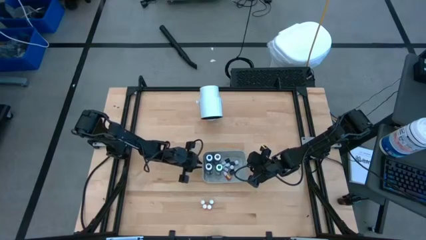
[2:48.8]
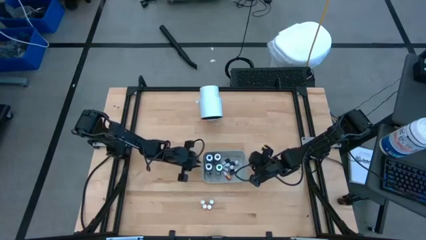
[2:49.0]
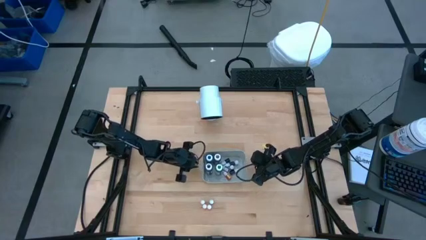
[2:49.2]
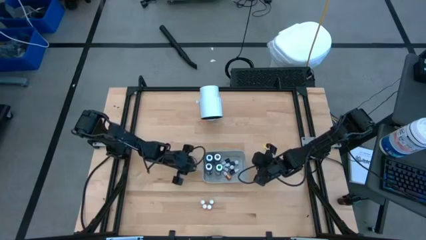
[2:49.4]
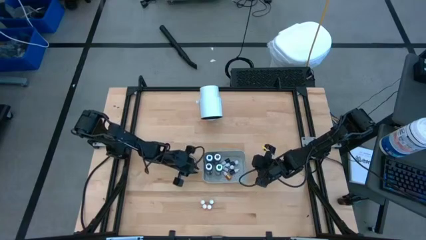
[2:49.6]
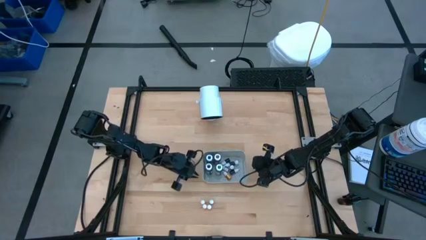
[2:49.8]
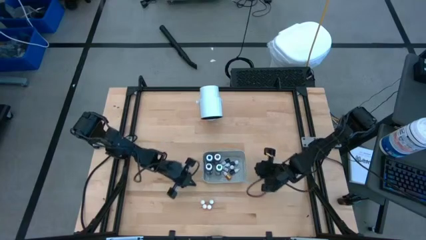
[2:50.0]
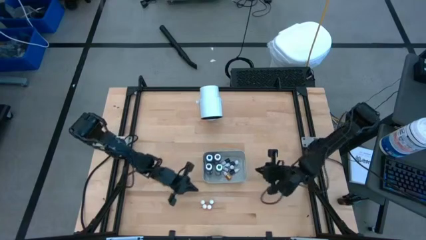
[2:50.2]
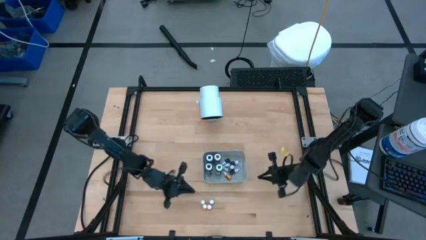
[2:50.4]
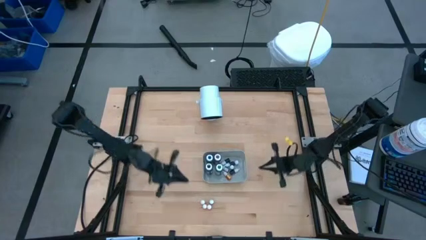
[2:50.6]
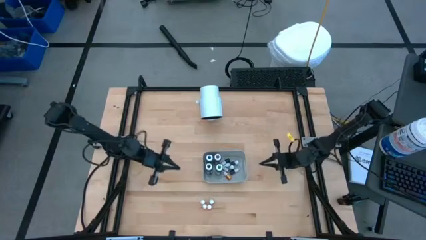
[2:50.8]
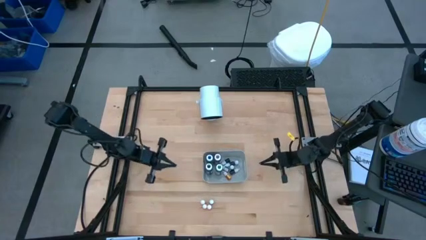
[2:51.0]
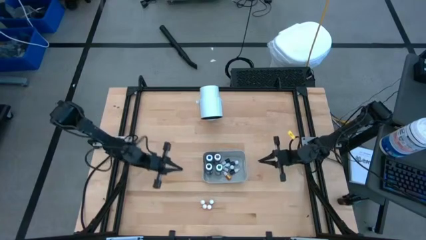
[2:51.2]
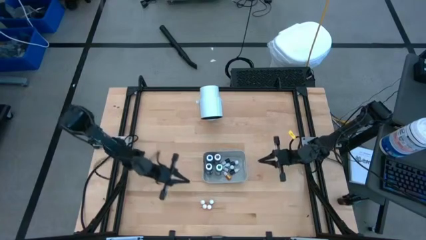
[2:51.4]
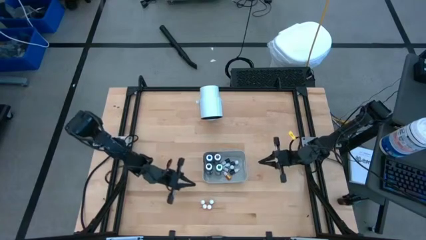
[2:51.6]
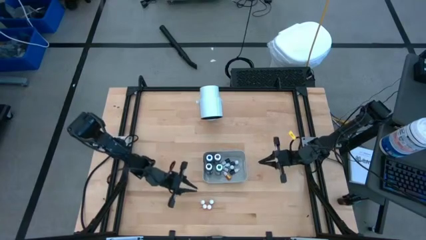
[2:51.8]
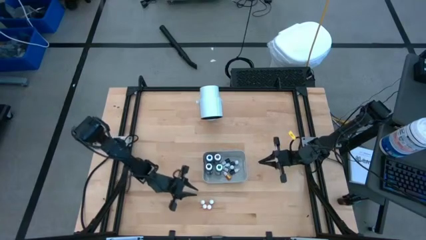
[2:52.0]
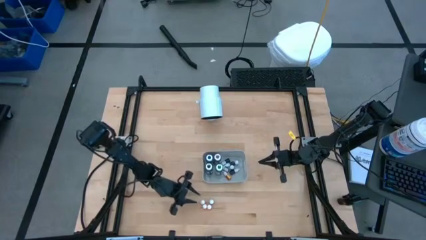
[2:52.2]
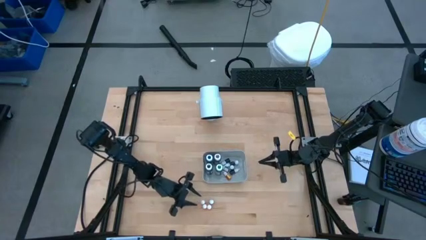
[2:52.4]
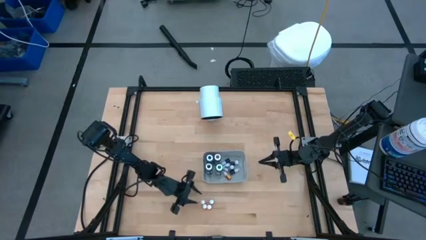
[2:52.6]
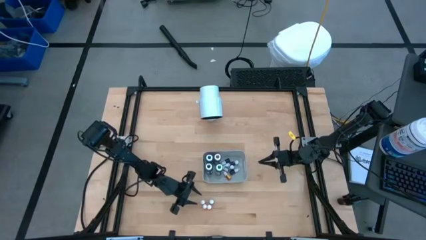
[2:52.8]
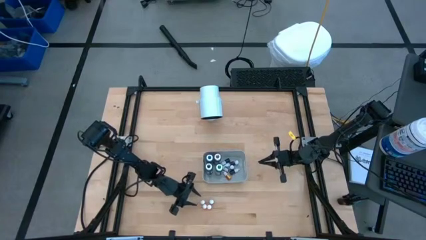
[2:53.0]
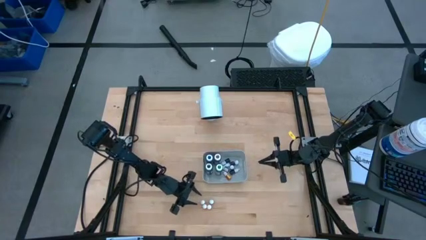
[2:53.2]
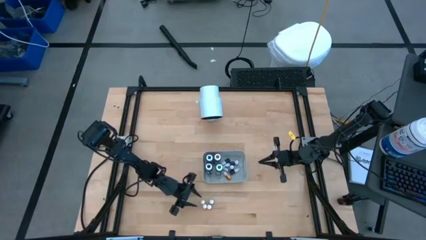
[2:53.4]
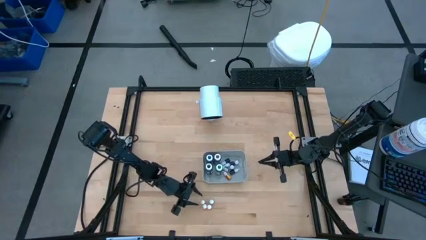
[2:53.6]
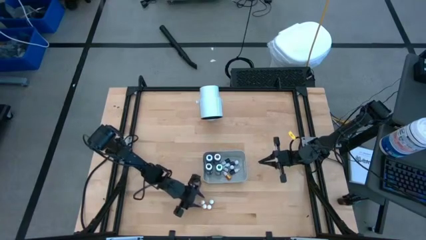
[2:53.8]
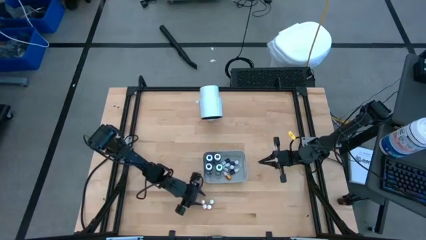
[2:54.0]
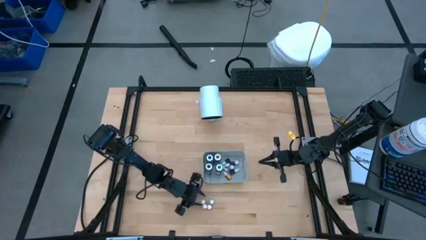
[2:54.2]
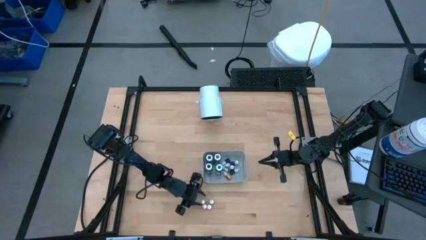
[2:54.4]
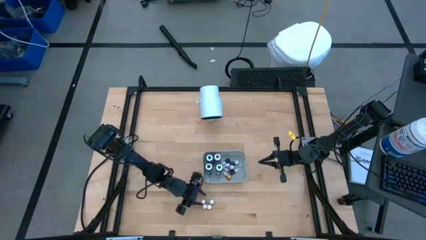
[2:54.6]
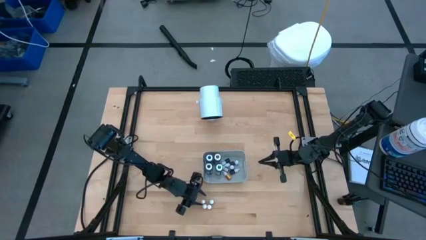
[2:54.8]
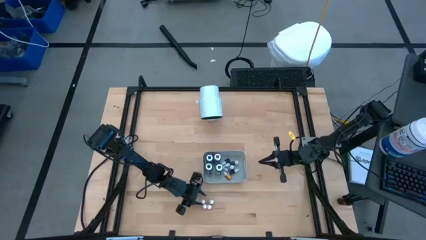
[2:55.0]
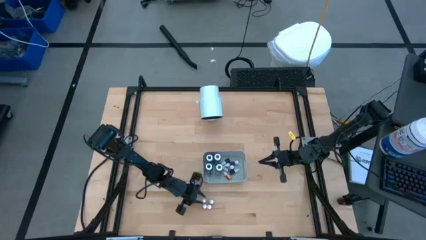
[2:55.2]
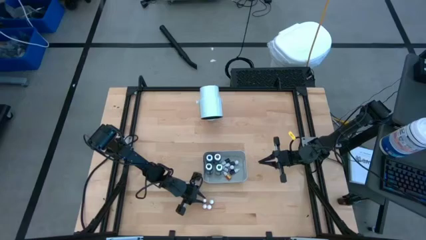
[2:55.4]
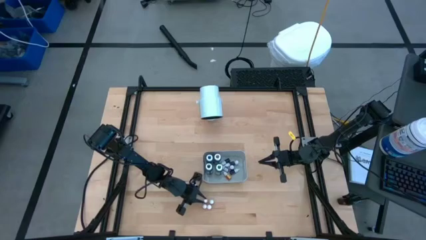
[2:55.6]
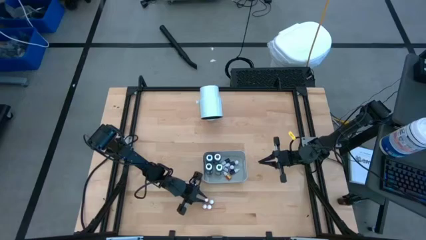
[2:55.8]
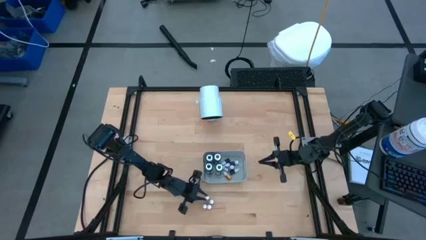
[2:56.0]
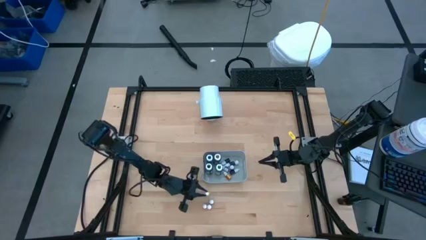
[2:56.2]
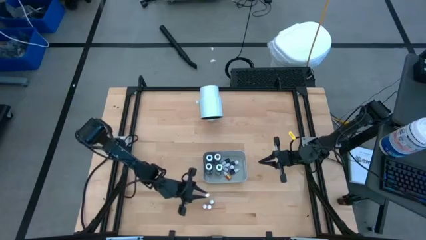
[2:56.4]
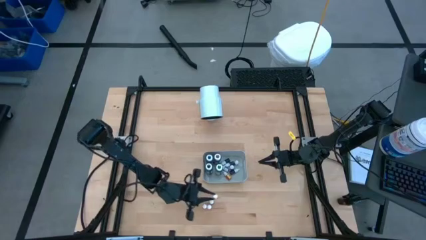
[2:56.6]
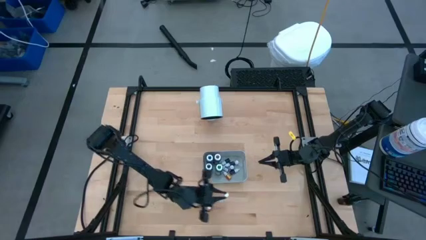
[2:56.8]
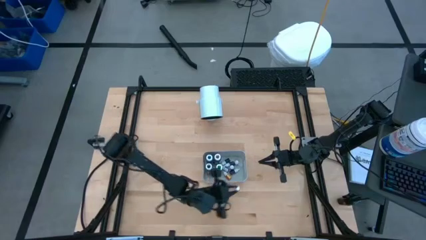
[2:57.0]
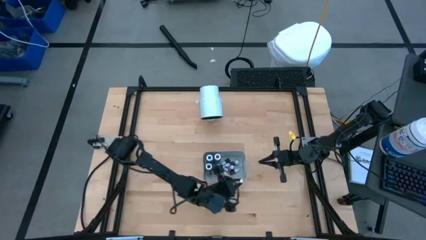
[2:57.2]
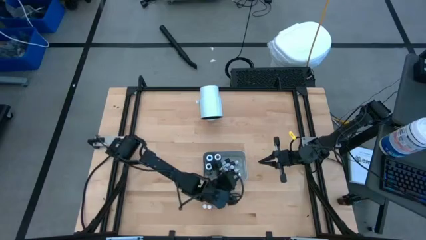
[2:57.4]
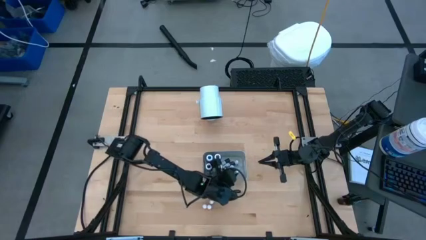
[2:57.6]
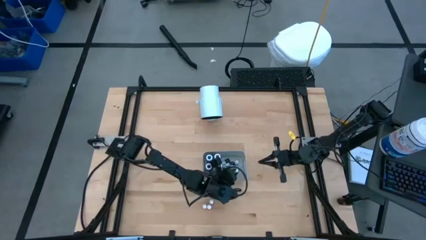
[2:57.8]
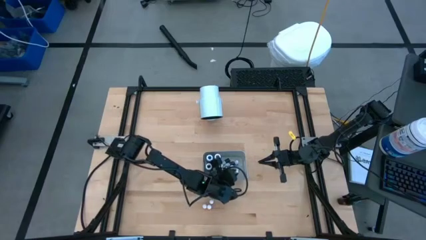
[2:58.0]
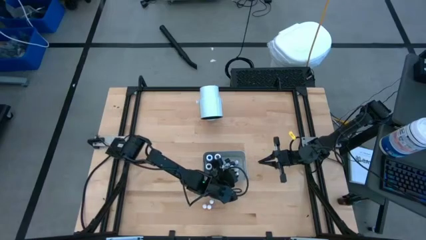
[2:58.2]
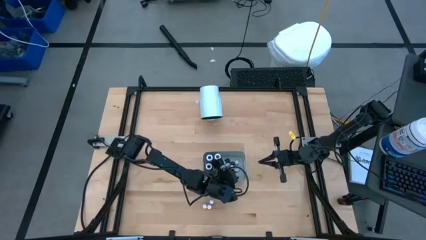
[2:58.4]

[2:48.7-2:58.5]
Task: Pick & Place food coloring
Put the orange food coloring bottle into the gray bin

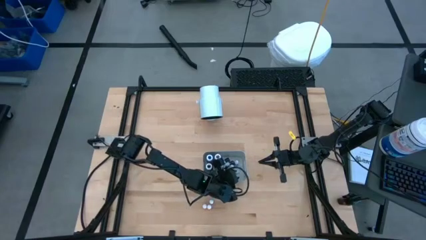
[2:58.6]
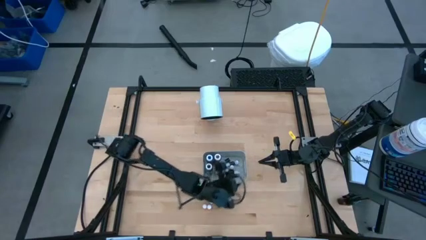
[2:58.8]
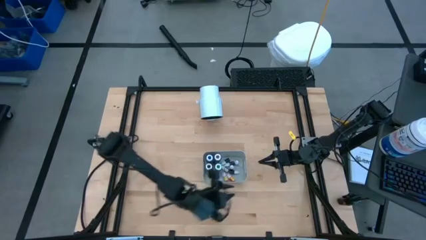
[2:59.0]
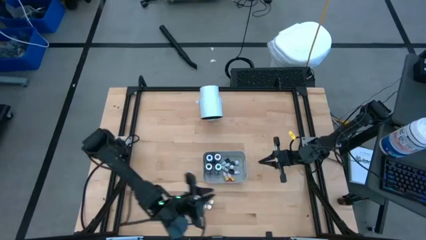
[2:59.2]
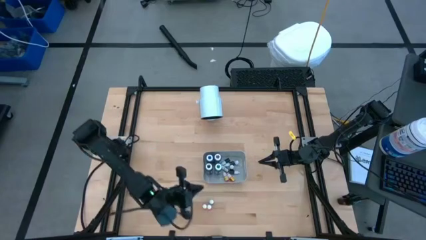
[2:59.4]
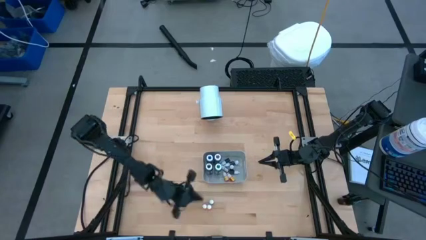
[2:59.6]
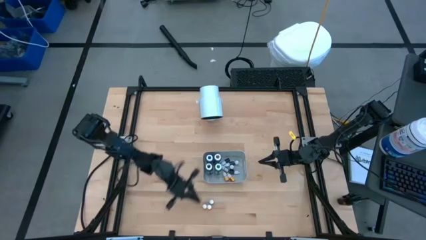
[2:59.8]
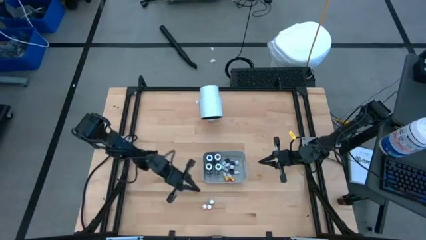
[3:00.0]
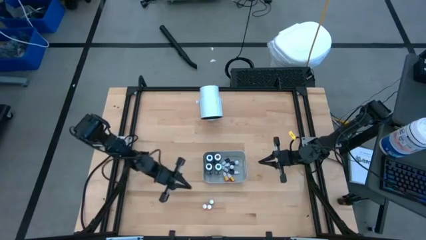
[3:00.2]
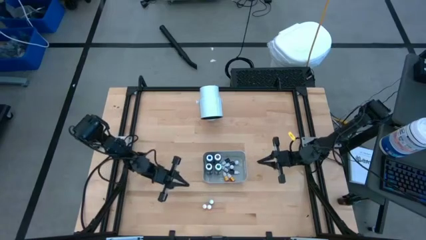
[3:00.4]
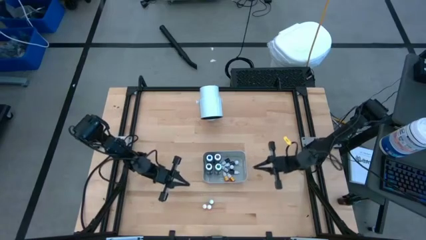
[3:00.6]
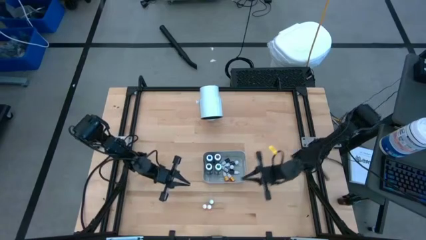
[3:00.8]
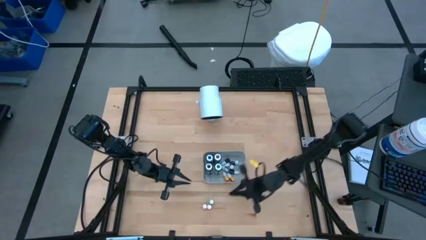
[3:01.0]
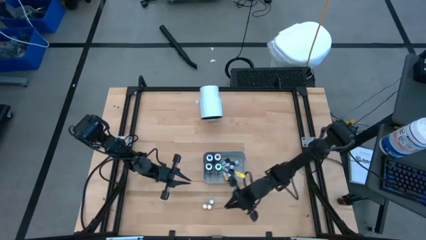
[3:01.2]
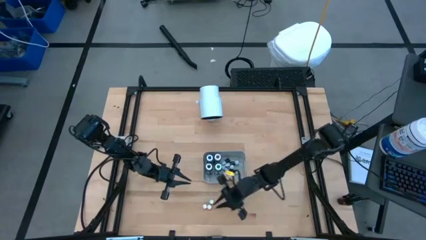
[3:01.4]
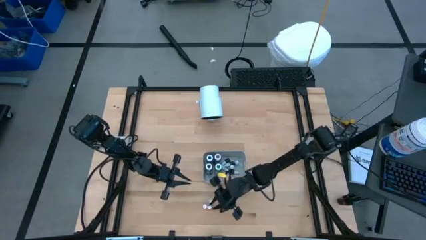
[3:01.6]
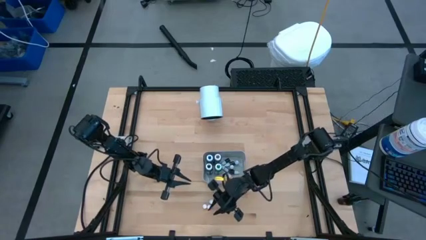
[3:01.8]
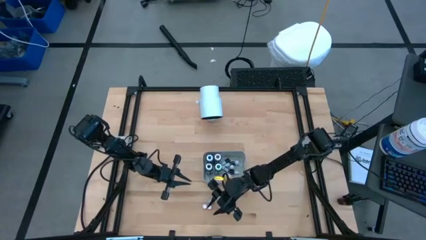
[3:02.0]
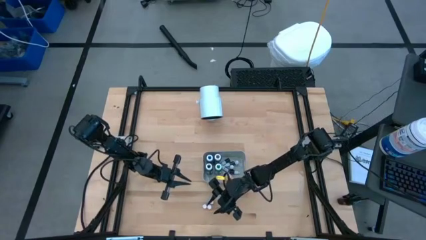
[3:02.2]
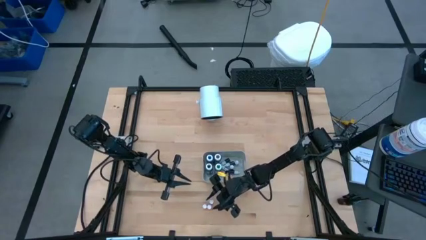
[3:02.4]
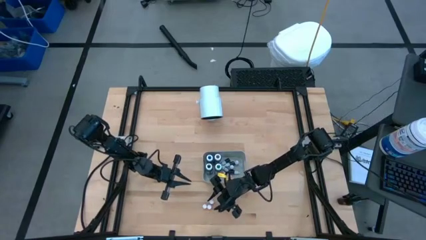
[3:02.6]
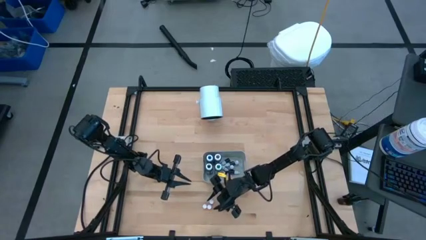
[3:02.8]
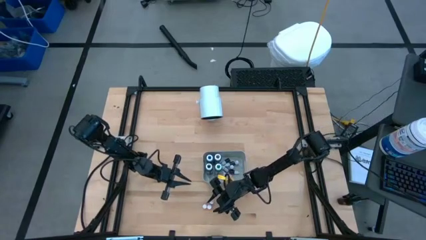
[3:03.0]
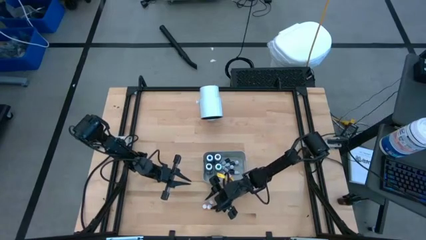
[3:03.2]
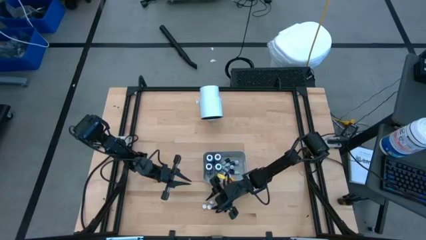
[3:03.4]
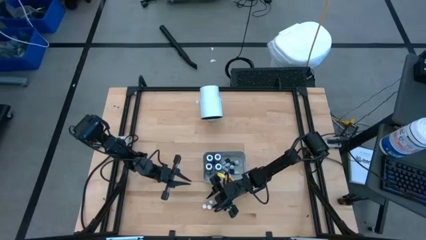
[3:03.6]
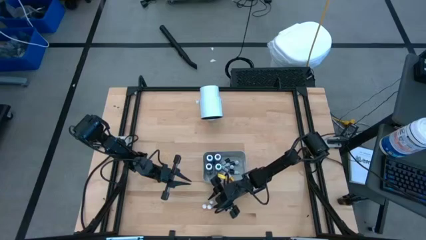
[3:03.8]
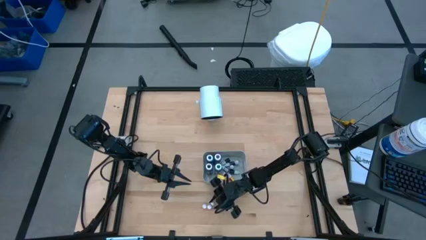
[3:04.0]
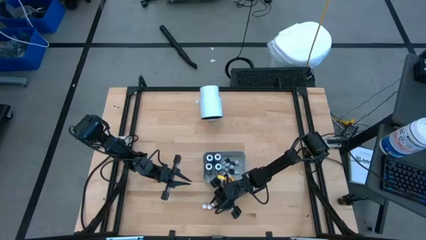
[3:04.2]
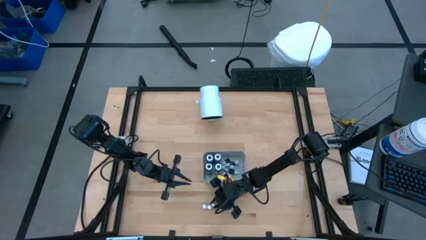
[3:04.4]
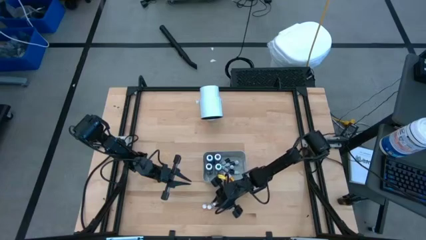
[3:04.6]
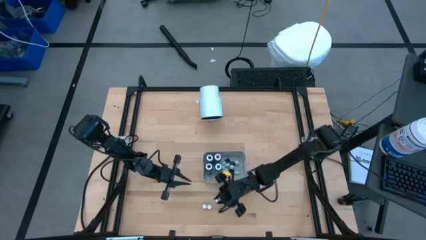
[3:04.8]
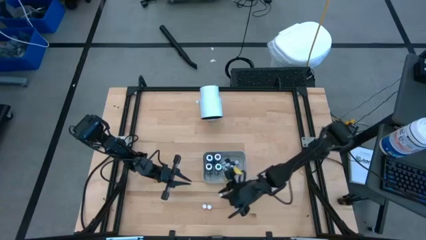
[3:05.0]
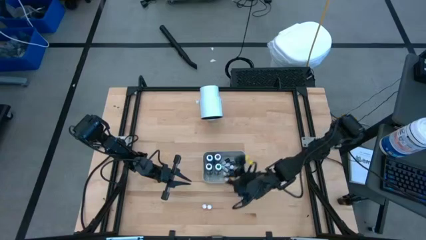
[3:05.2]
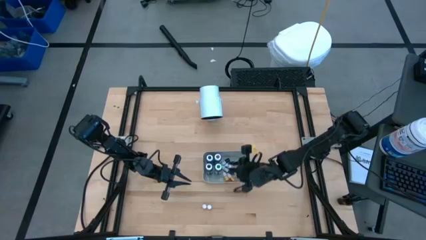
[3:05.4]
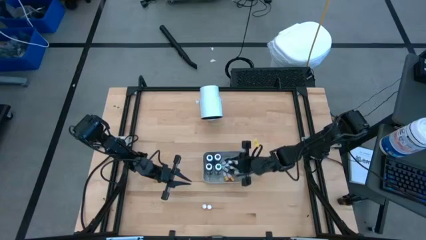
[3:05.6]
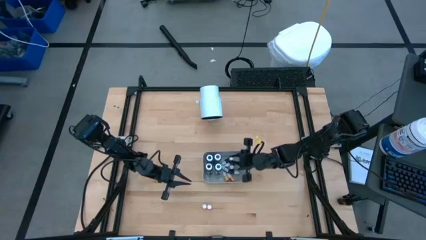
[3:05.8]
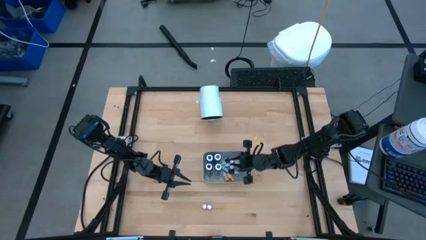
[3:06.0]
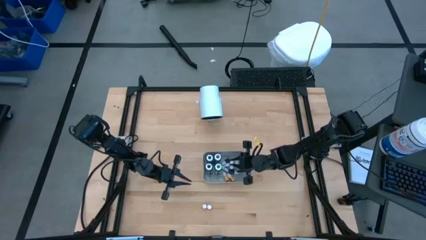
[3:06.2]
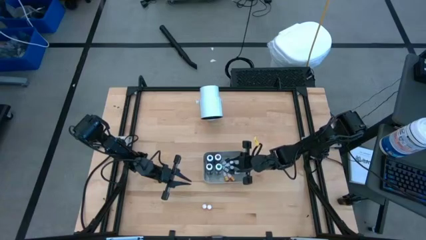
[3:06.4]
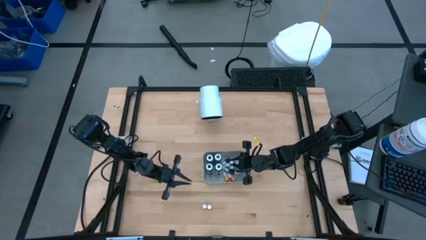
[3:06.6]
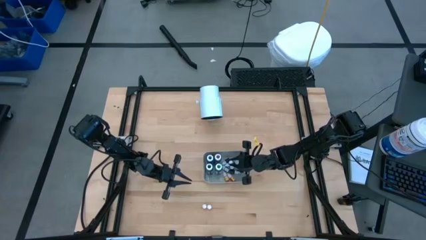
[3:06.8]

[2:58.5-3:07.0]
Put the small blue food coloring bottle into the gray bin
